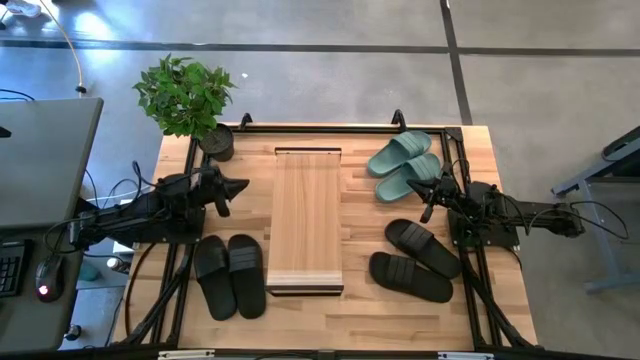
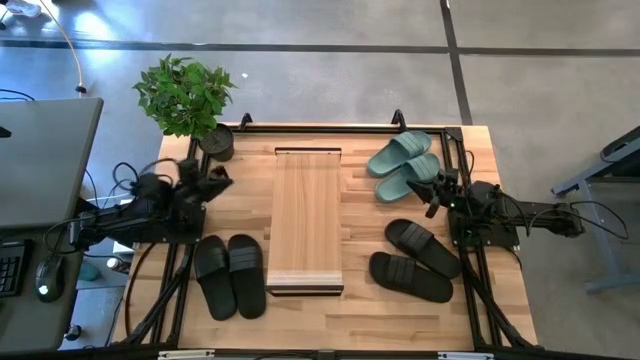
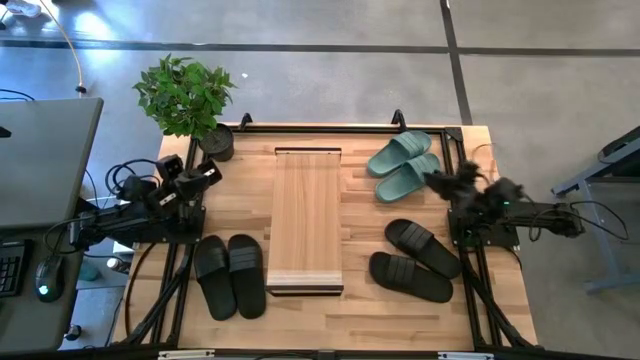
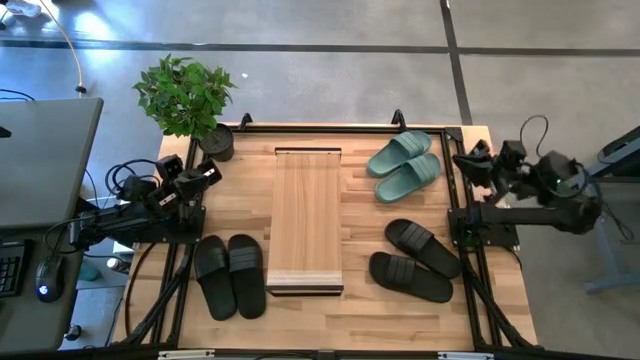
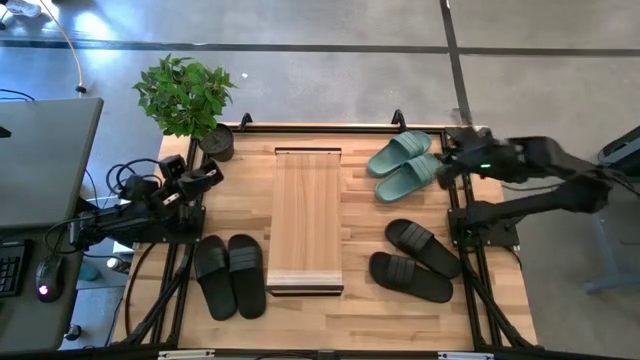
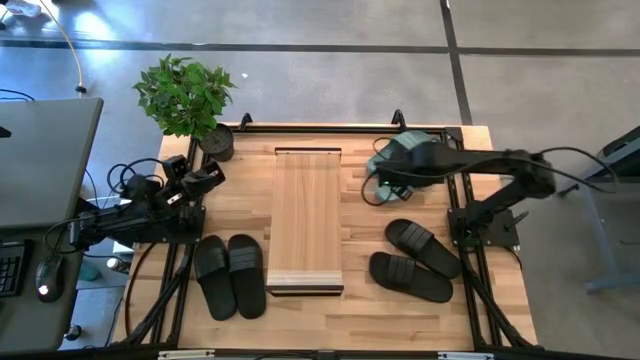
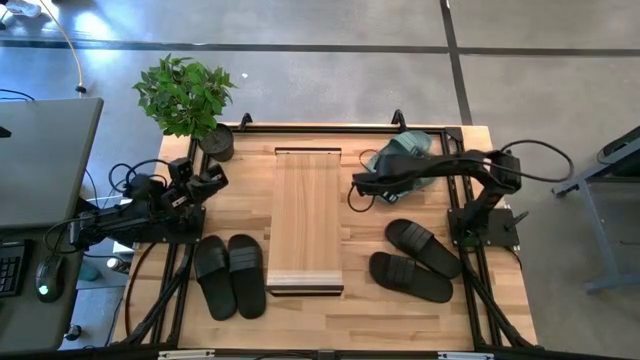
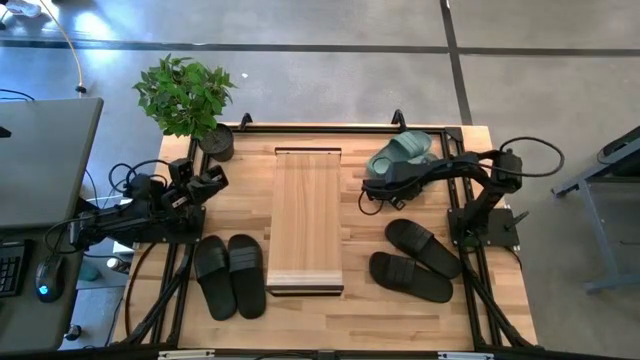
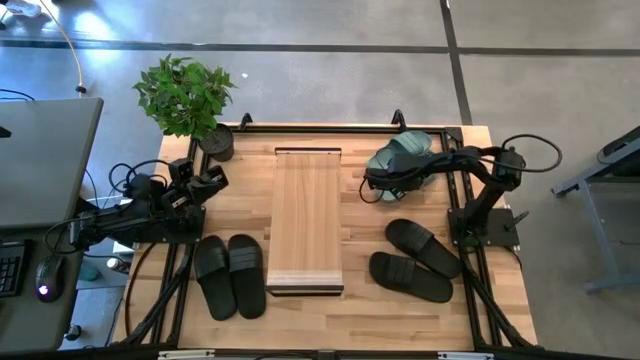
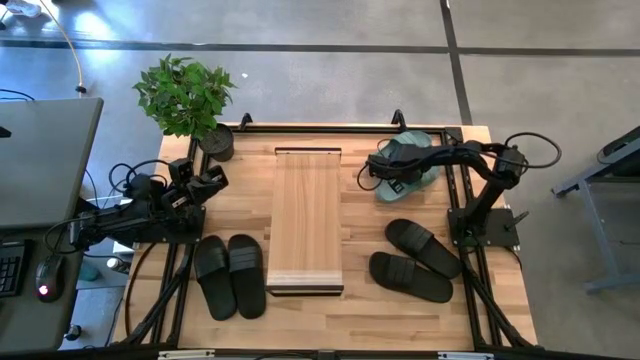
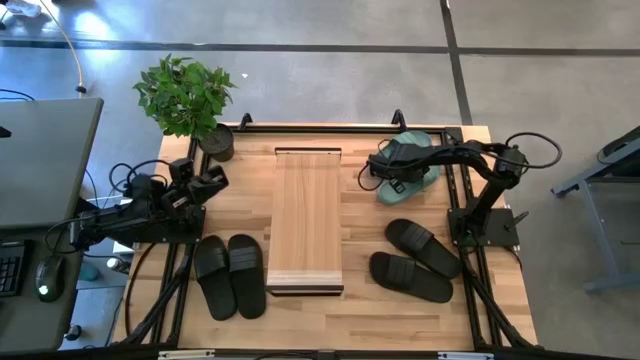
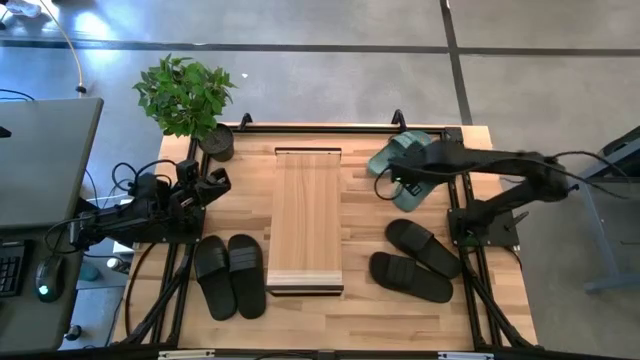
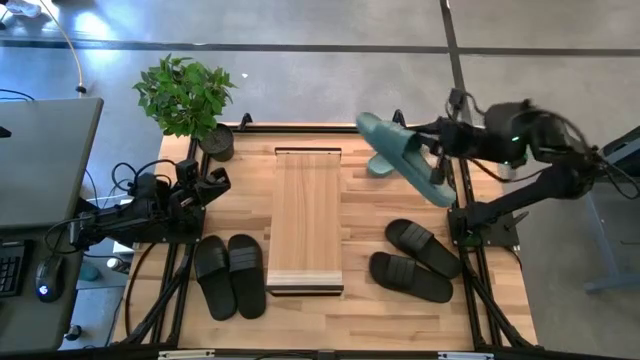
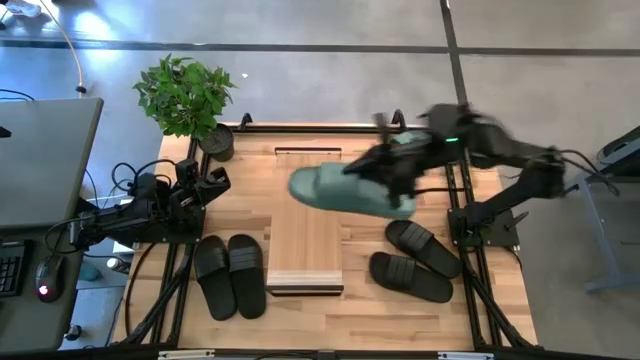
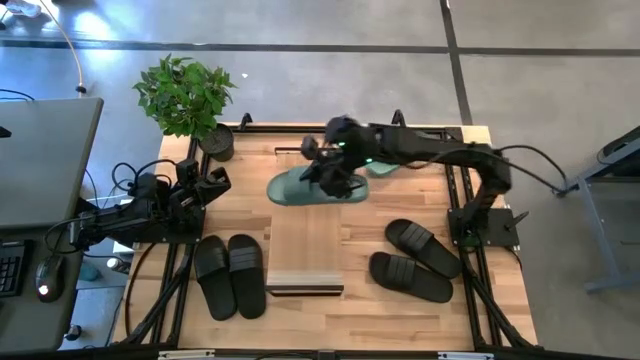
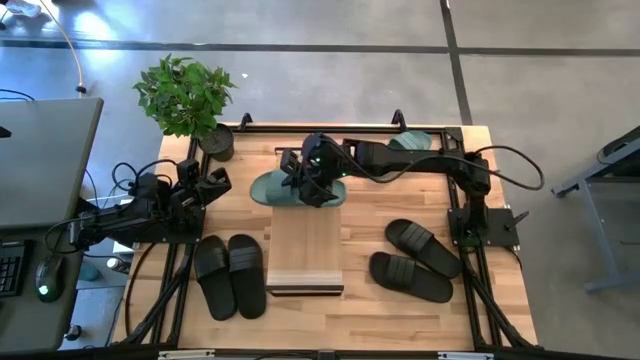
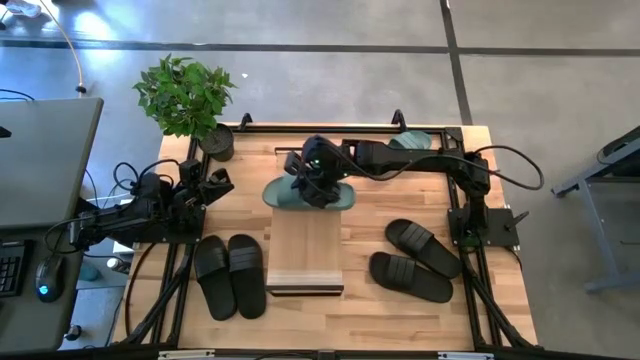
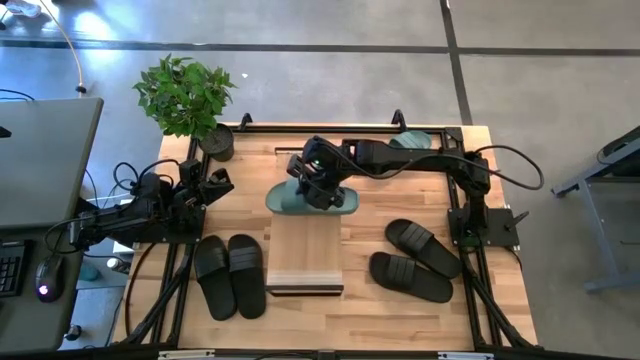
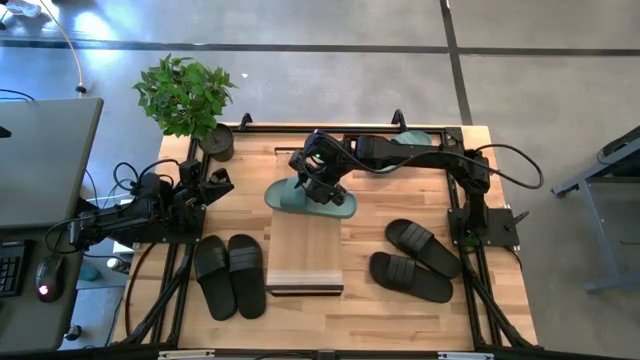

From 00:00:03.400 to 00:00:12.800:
Task: Pick and place slides into the shelf
Put the green slipper on the shelf

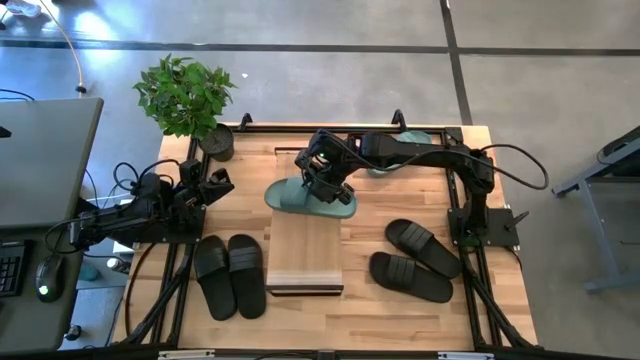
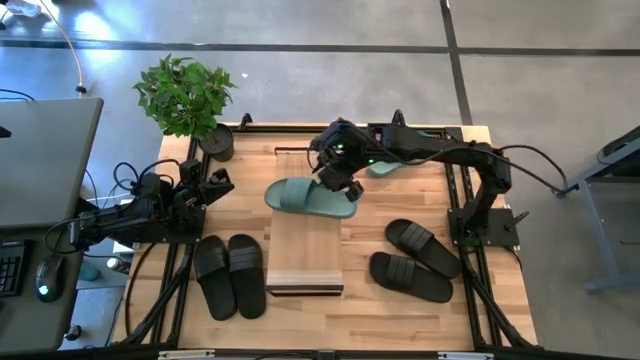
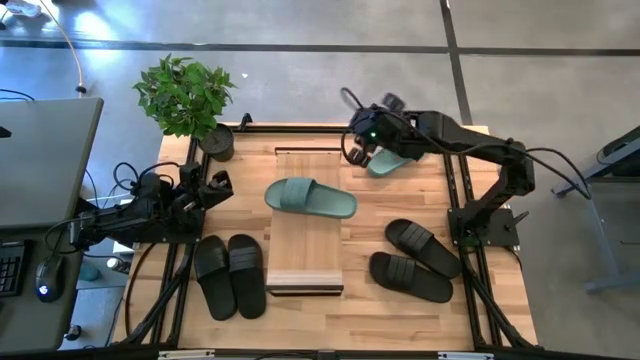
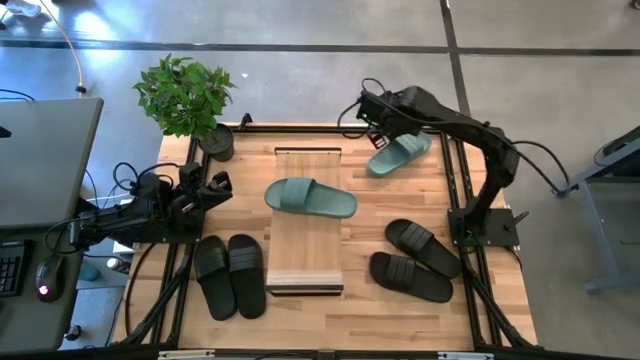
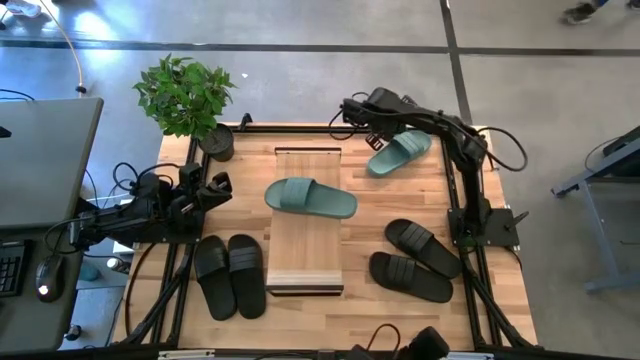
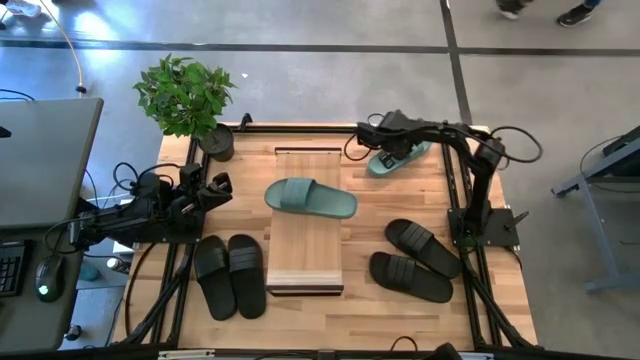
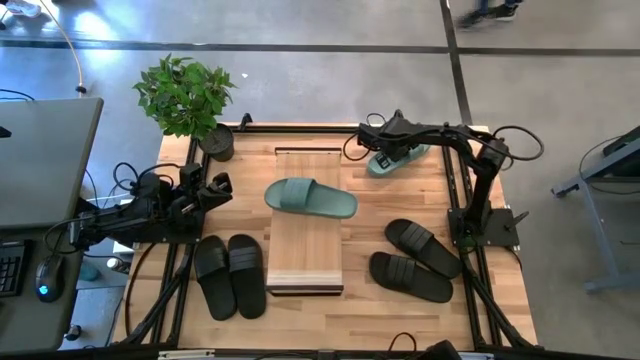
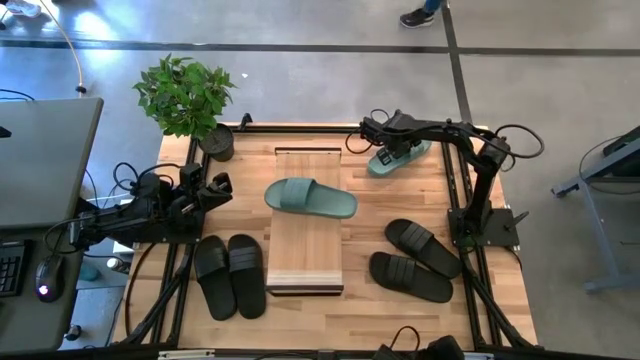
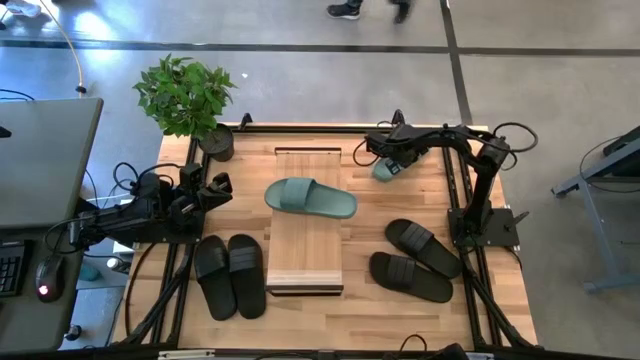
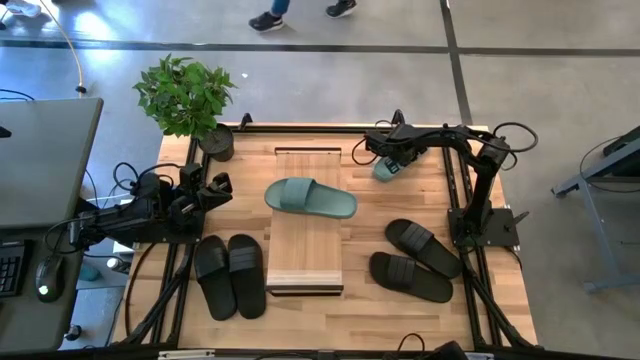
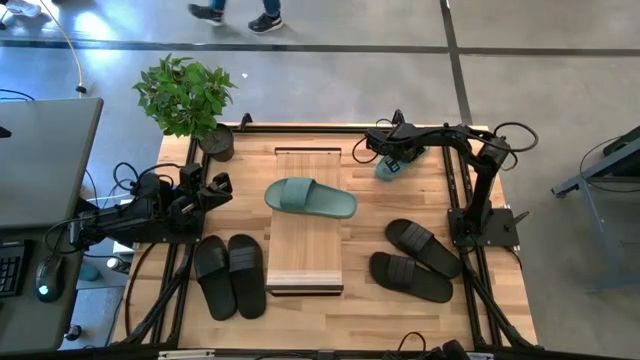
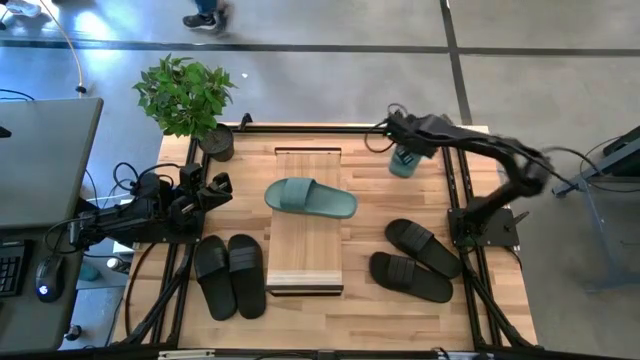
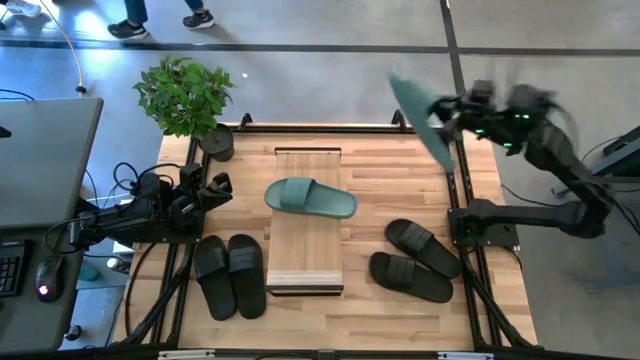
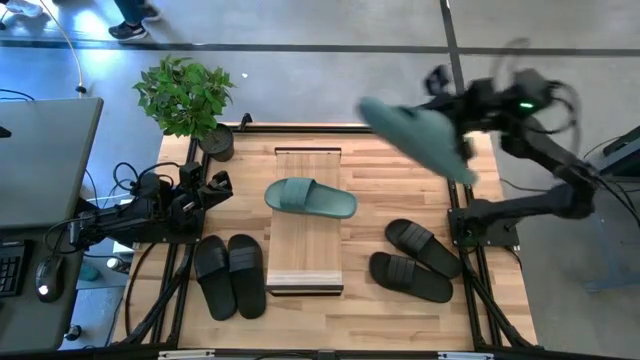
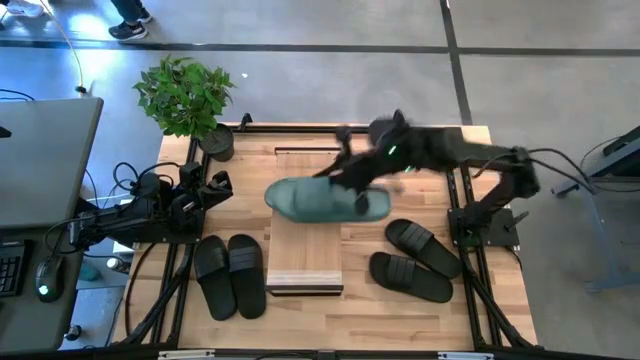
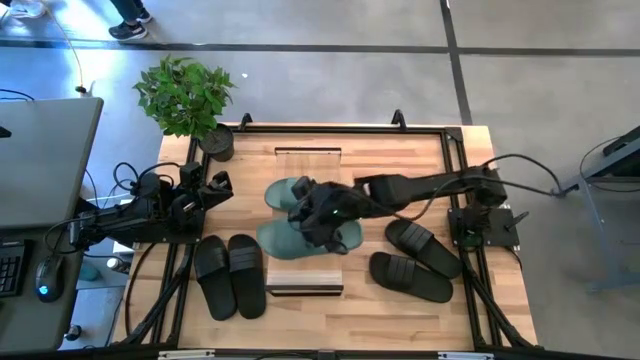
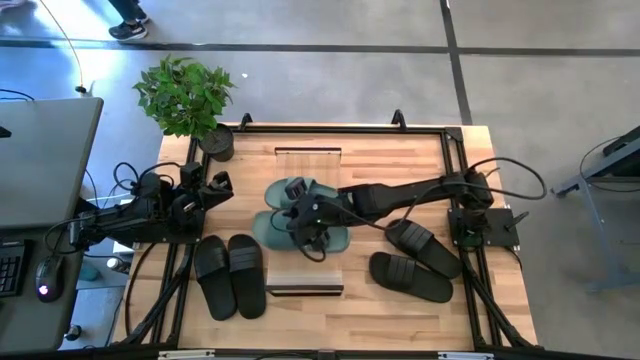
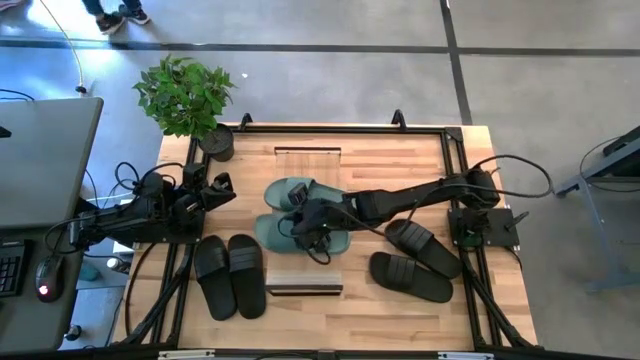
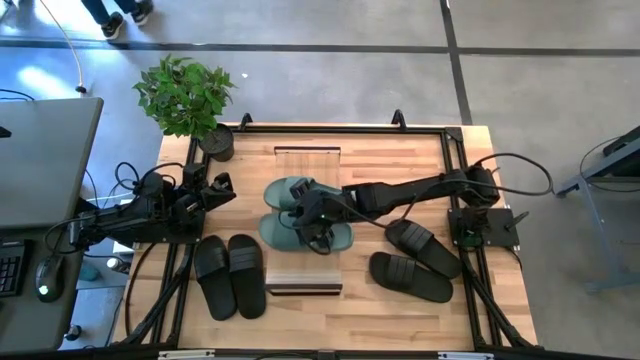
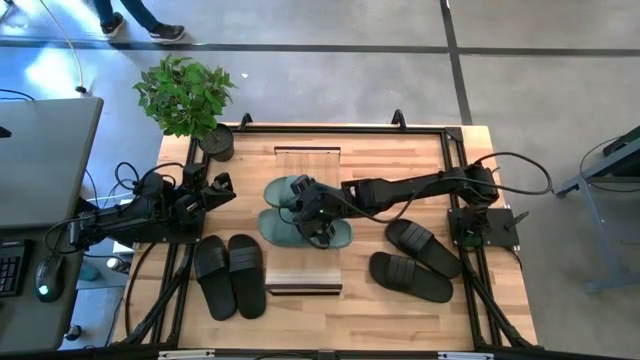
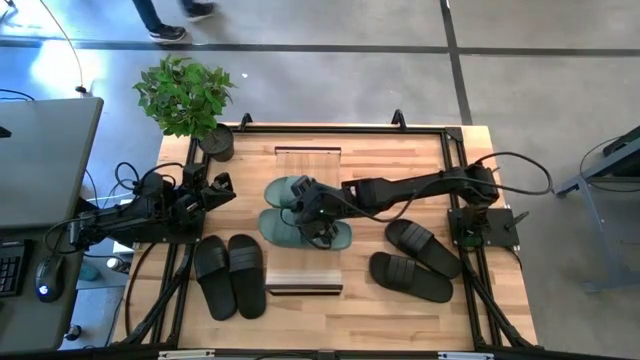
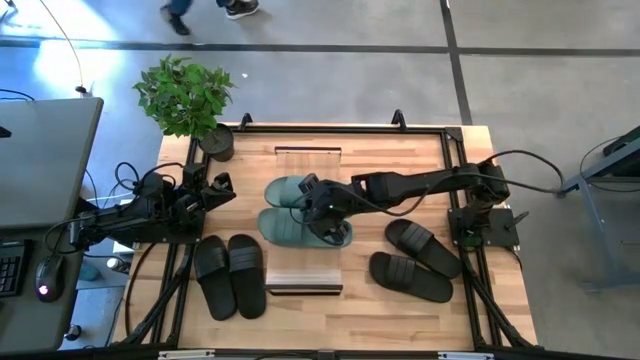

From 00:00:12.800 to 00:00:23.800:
Put the green slipper on the shelf

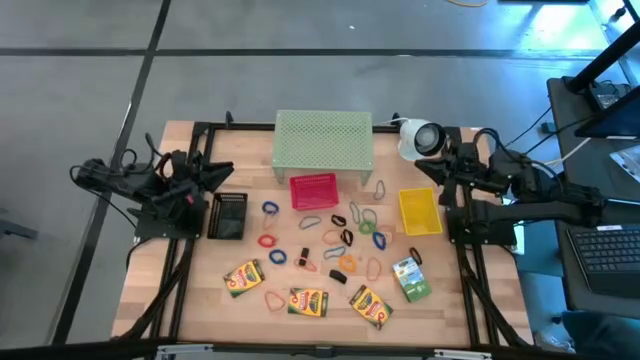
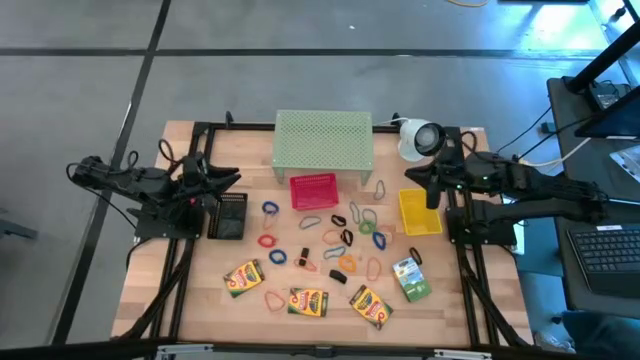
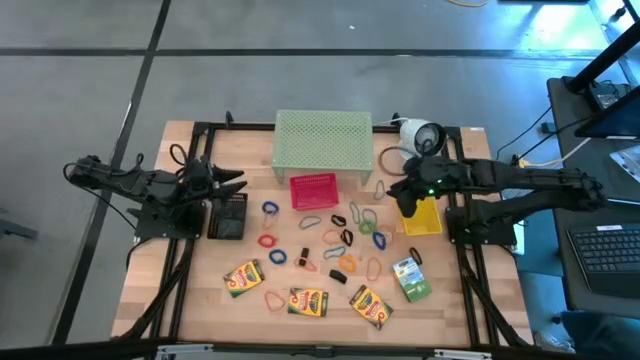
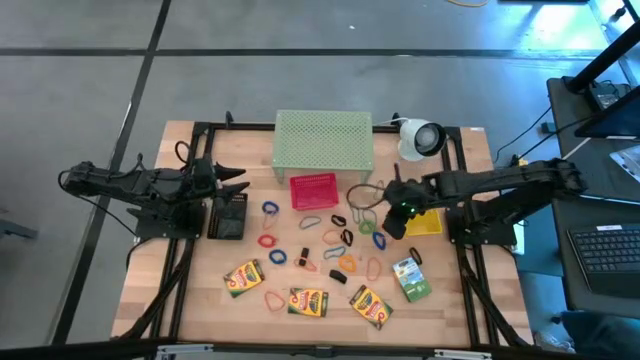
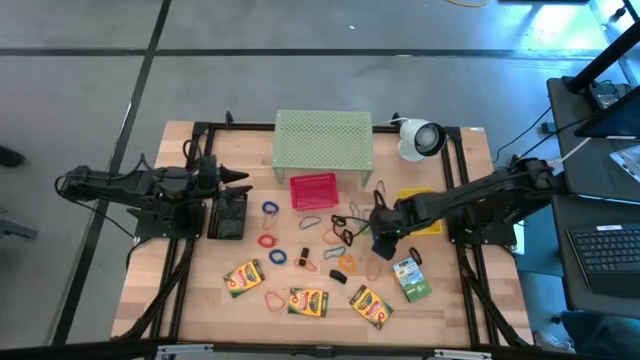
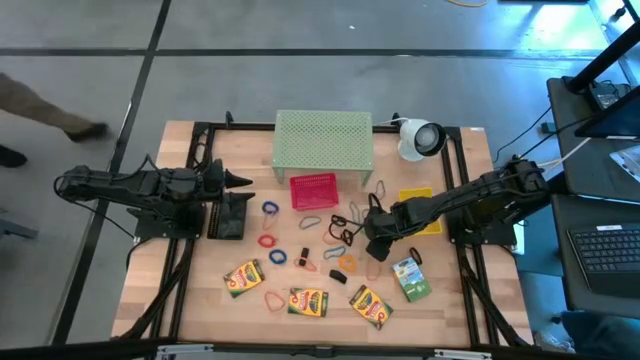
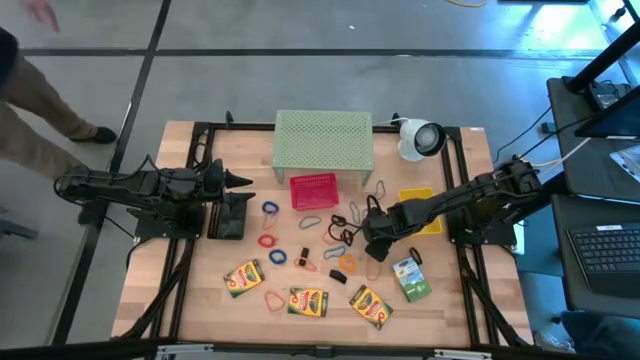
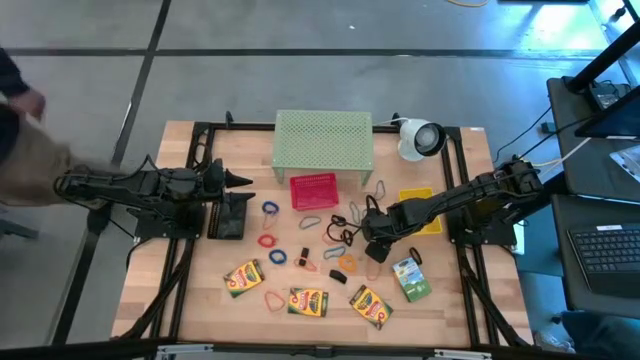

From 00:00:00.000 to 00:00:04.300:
Task: Pick & Place Office Desk Supplies
Put the blue spring keychain into the yellow bin
